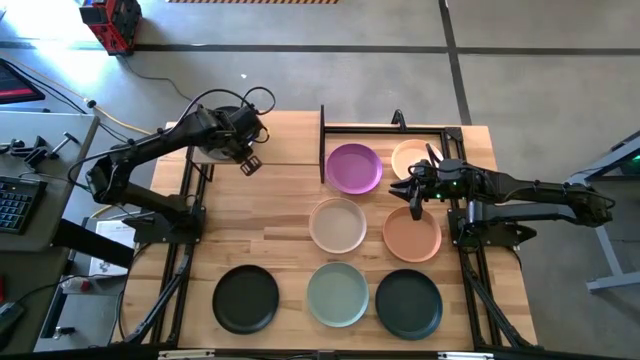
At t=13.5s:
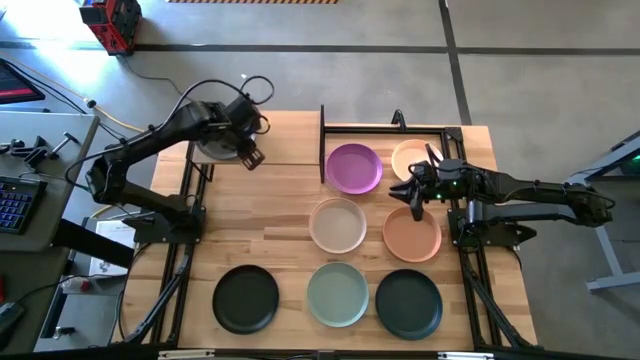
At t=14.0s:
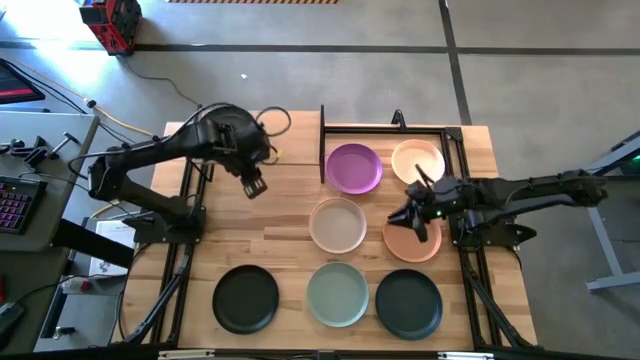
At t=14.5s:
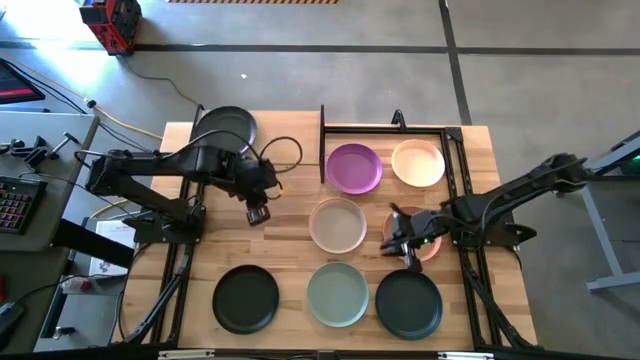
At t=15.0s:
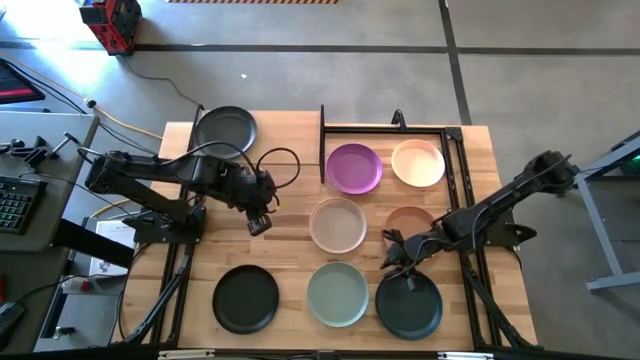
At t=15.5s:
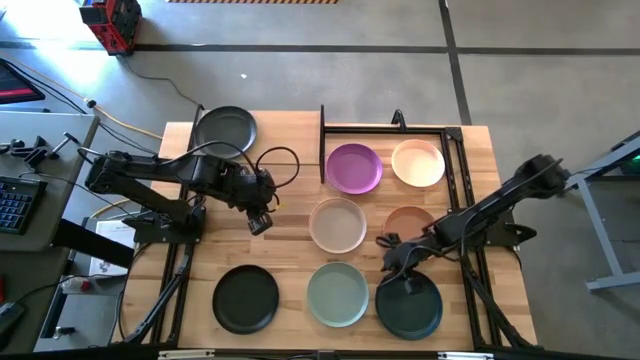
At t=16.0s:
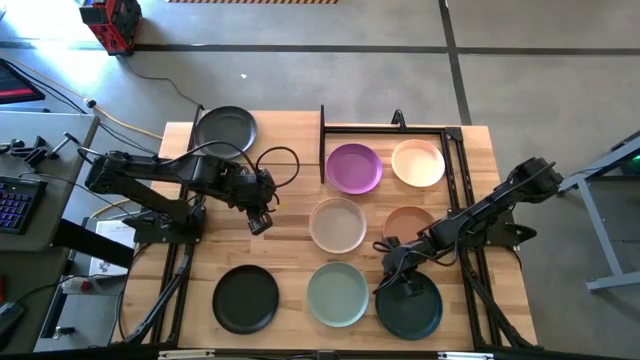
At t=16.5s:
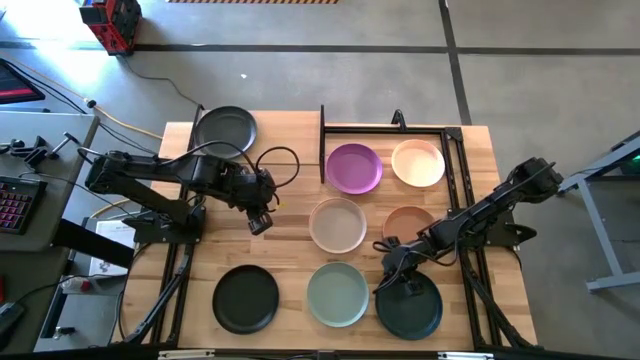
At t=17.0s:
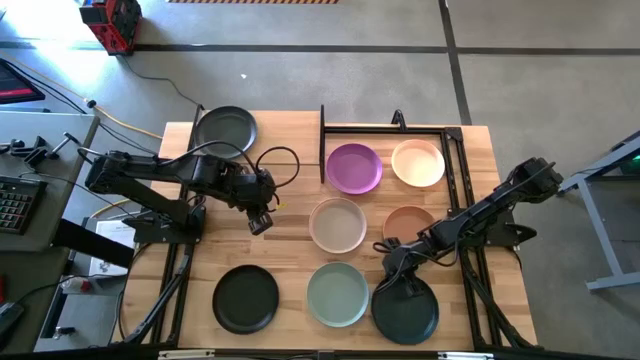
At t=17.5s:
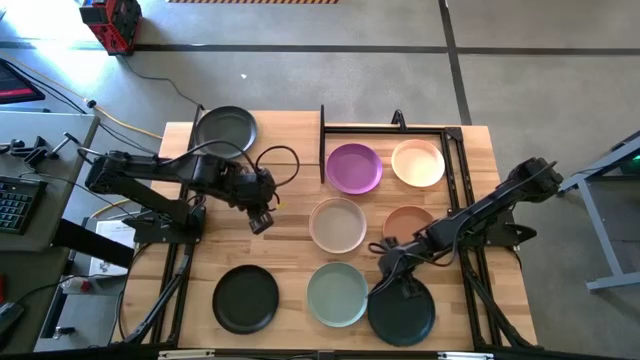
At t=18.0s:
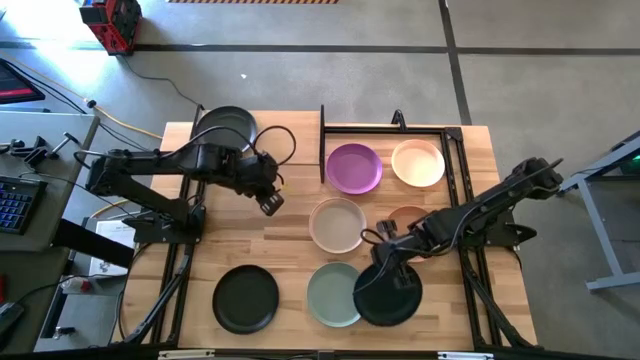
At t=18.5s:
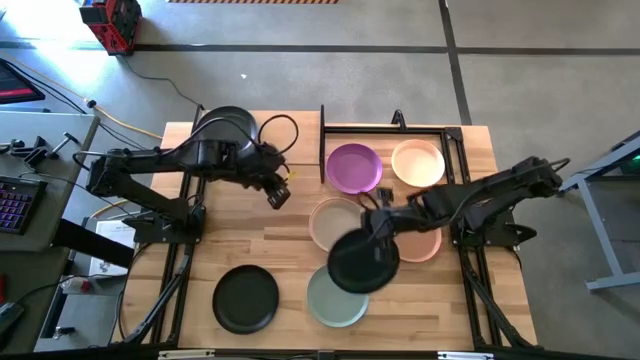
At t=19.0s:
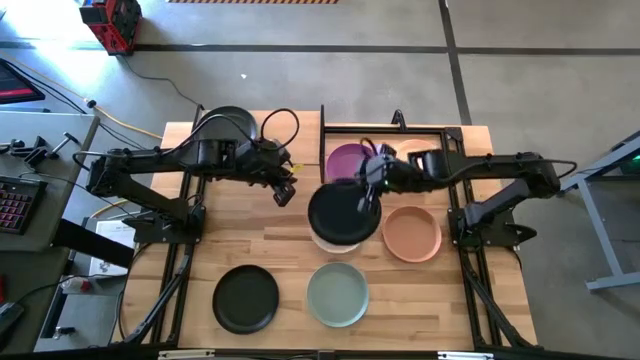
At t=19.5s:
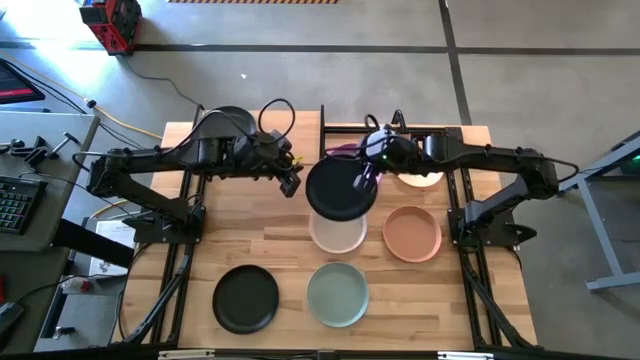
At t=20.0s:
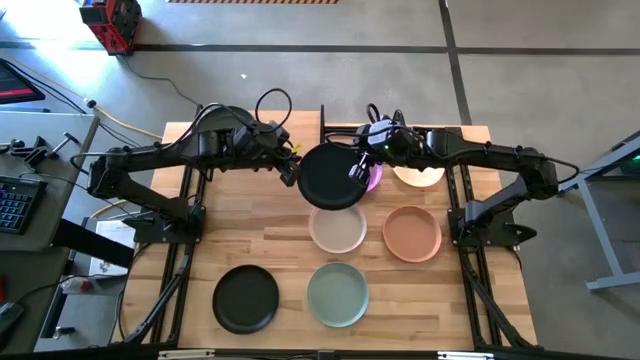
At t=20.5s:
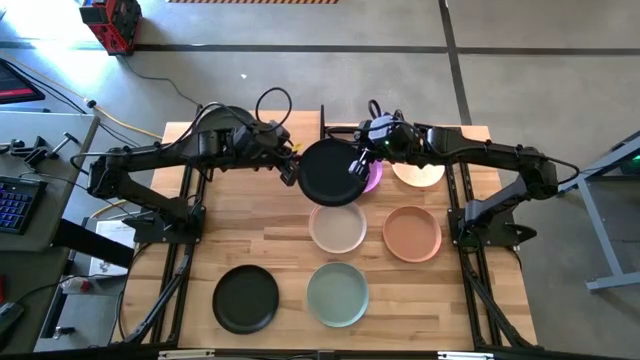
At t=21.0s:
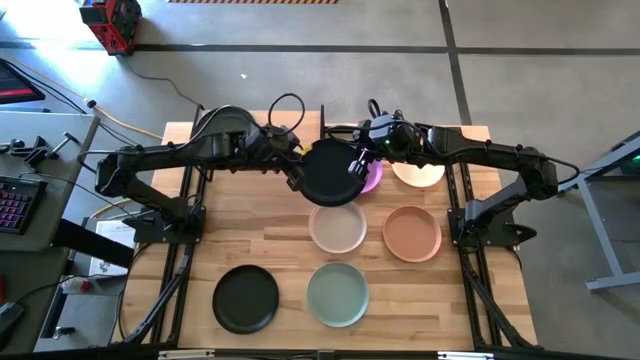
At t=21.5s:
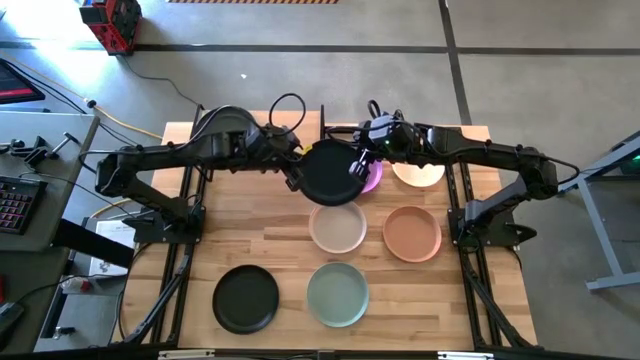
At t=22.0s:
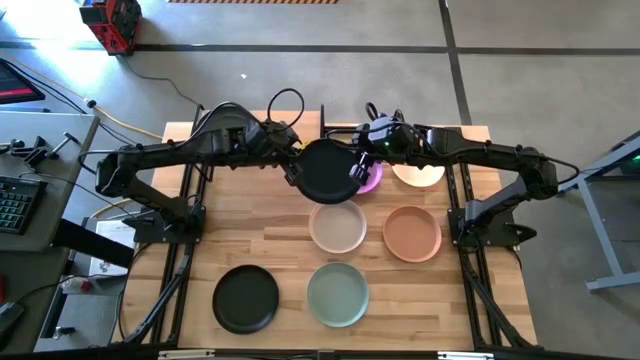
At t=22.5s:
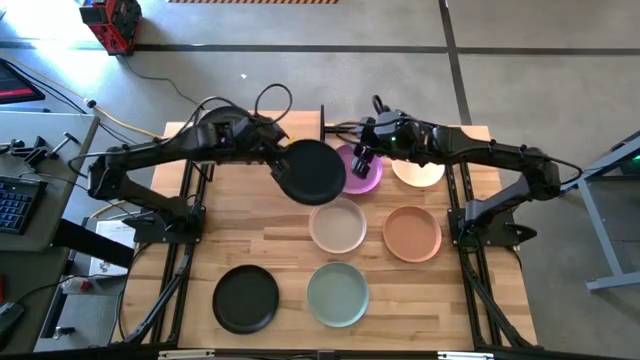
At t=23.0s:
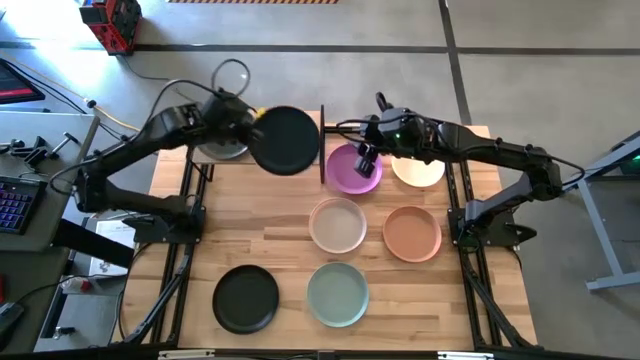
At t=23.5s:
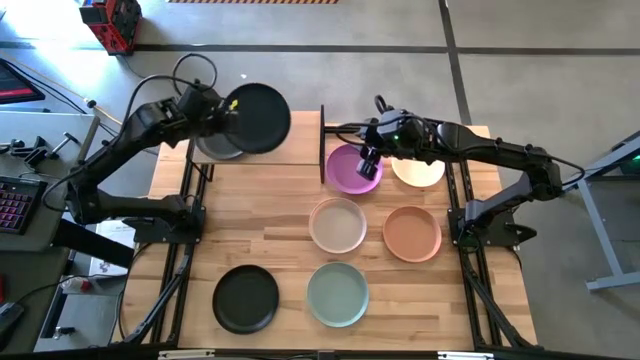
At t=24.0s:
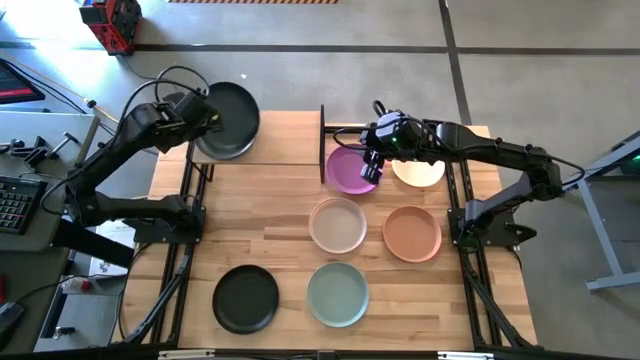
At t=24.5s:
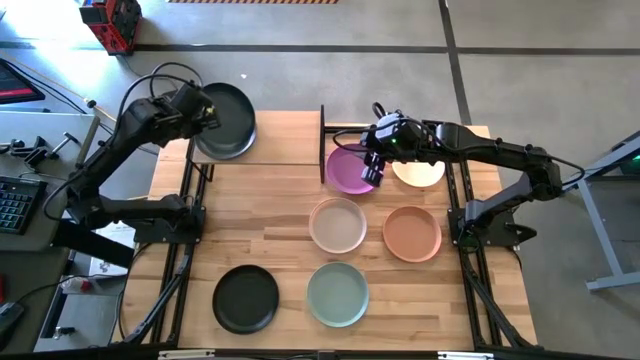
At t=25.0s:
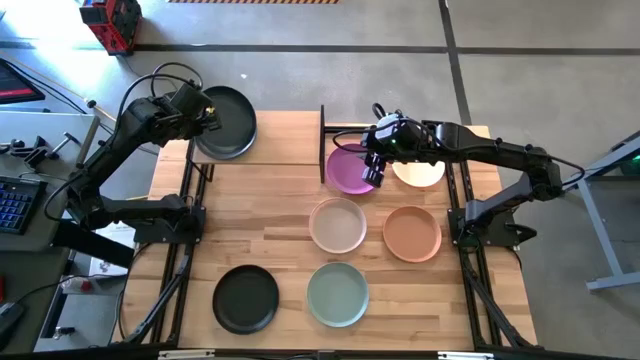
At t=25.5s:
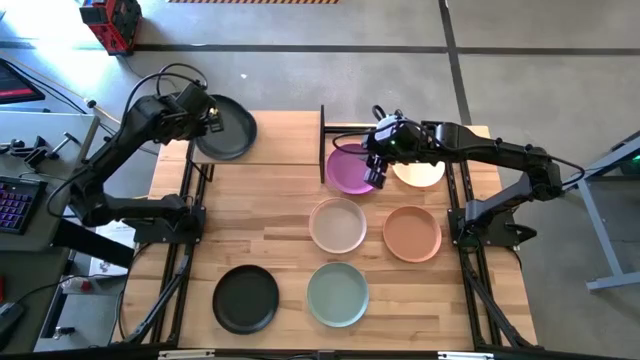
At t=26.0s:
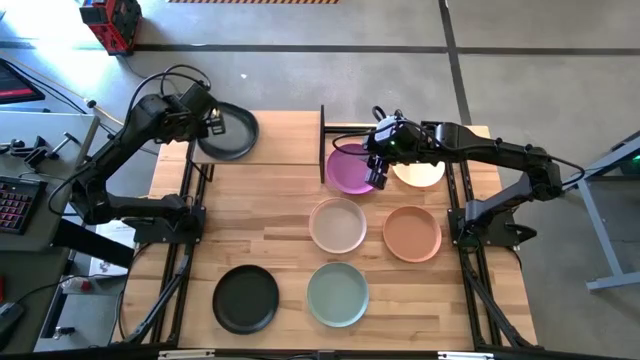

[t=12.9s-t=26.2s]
Task: Place and stack plates onto a shelf
Stack the right black plate on top of the black plate on the shelf

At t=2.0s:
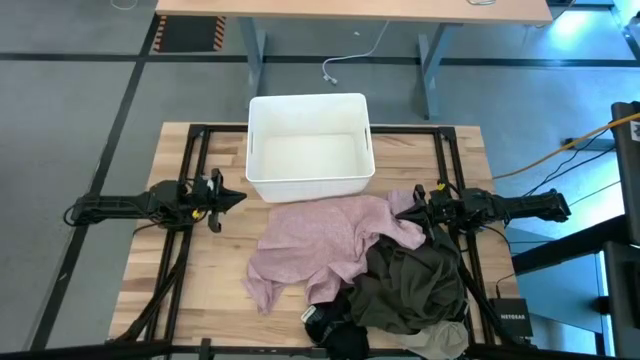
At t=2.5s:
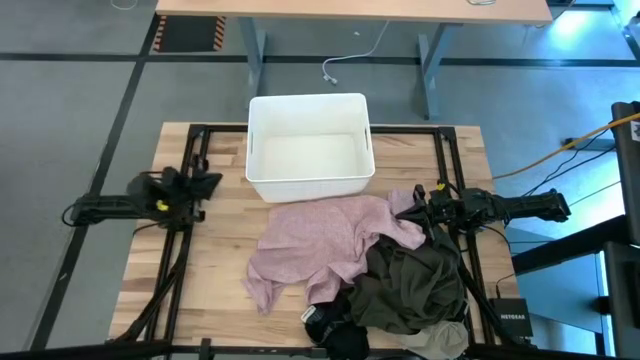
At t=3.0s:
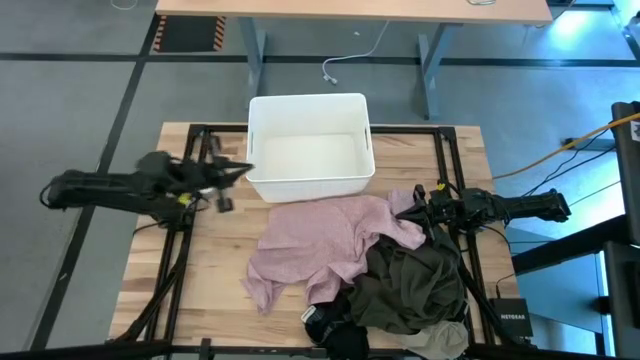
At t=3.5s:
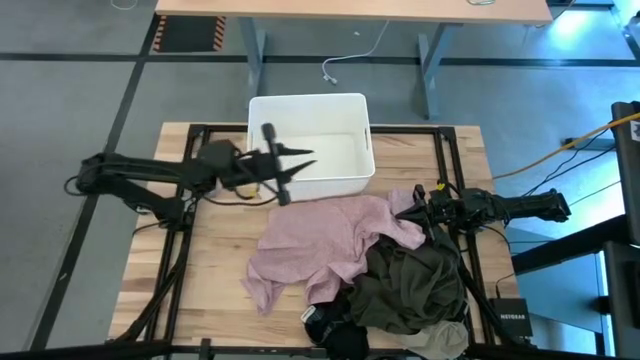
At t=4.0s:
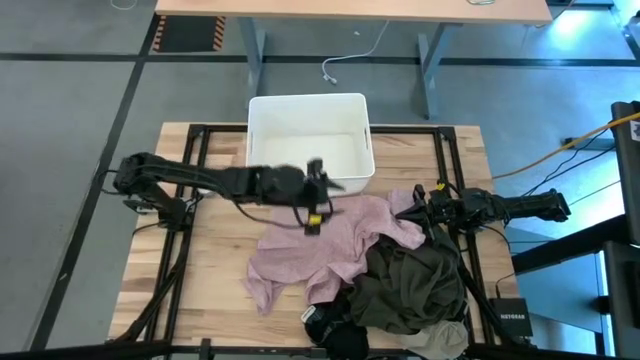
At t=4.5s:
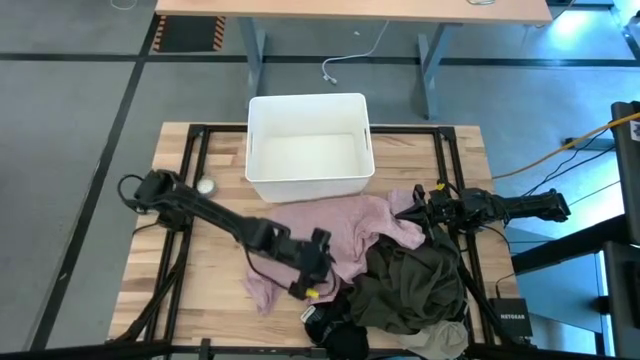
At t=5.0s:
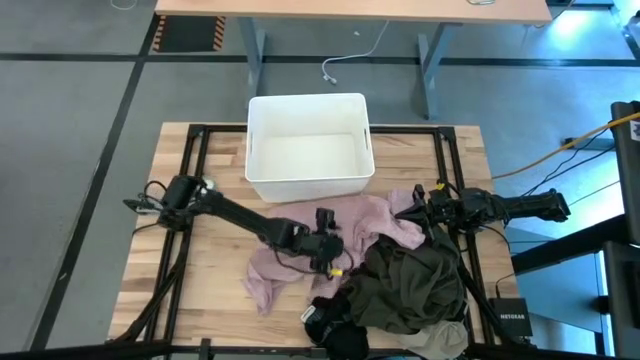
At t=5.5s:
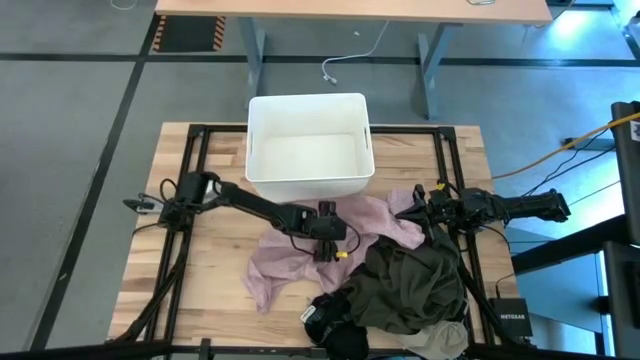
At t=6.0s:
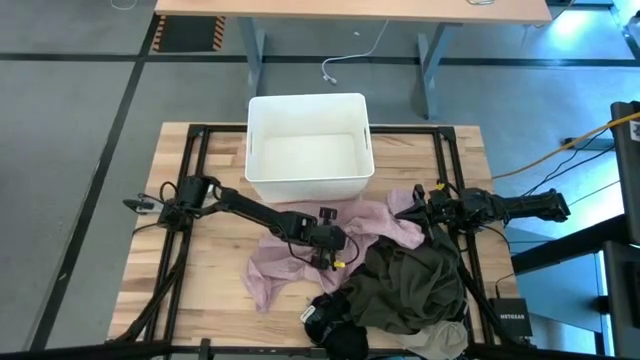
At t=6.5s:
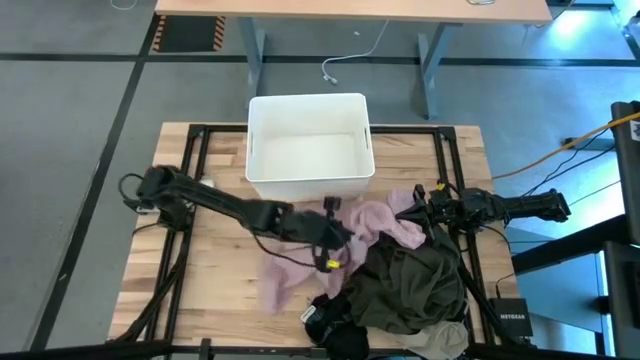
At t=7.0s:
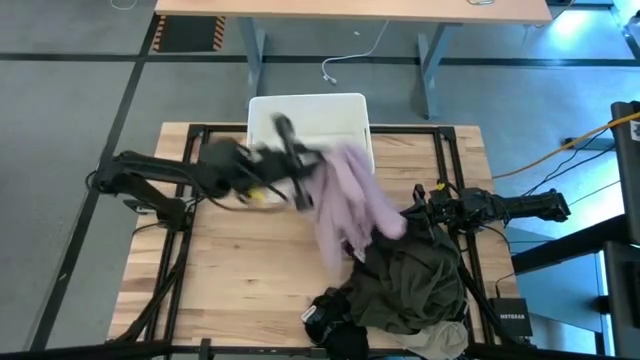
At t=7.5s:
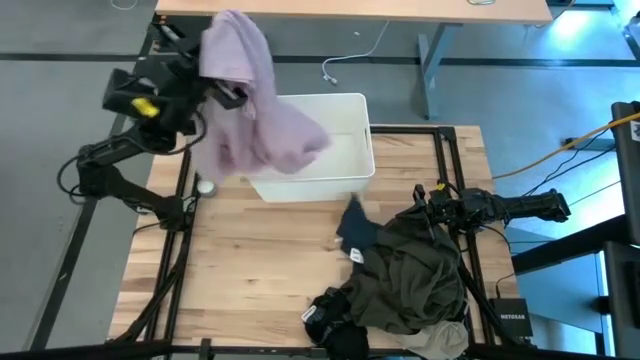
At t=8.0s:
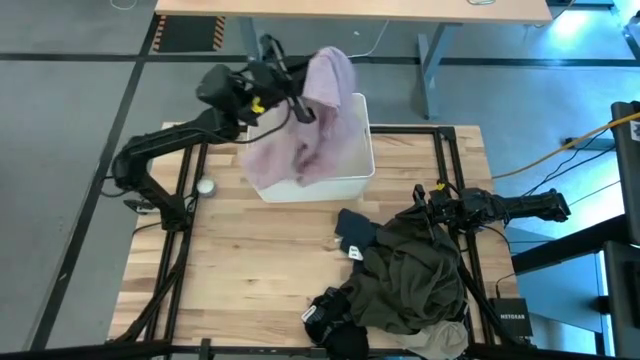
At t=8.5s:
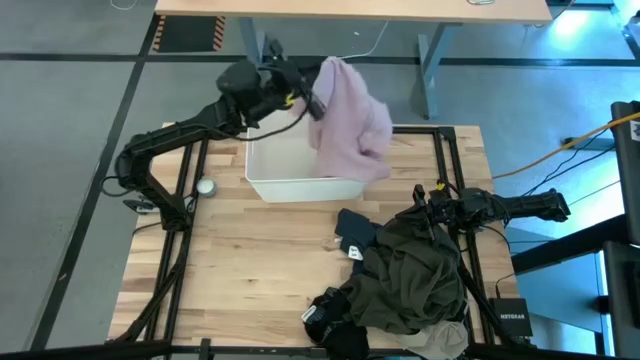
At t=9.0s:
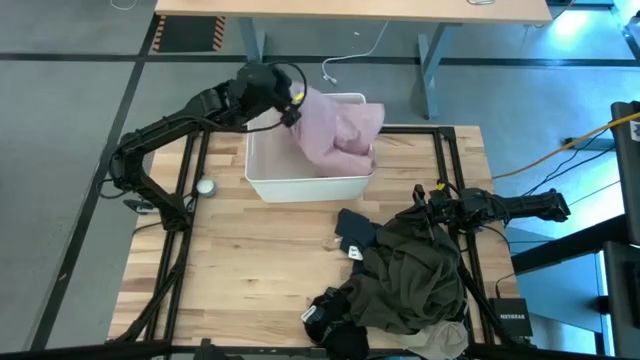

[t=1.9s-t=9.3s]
Task: Sort clothes
Put the pink polo shirt into the white laundry bin
